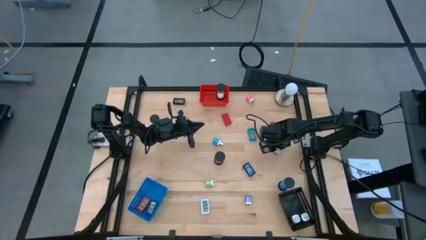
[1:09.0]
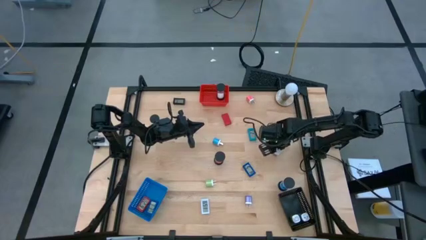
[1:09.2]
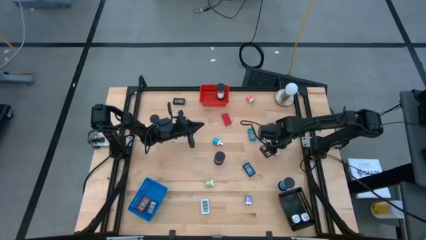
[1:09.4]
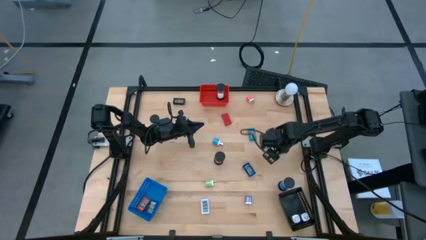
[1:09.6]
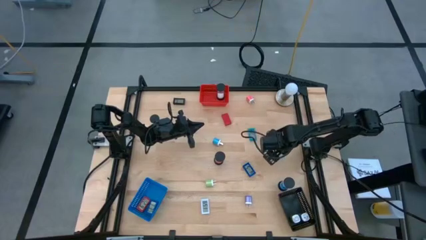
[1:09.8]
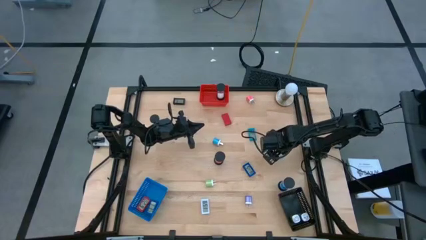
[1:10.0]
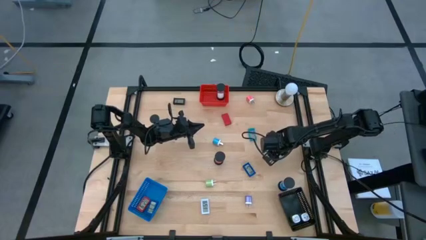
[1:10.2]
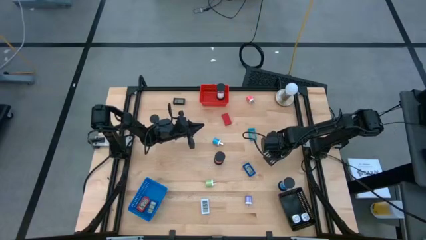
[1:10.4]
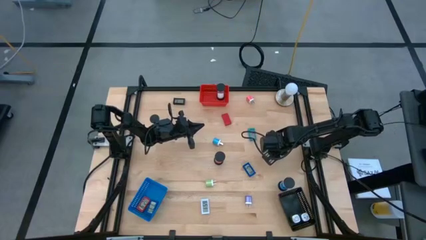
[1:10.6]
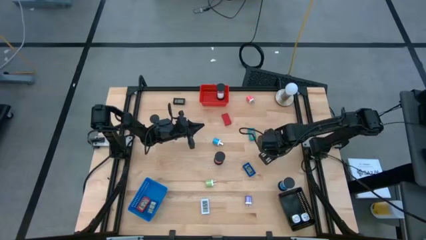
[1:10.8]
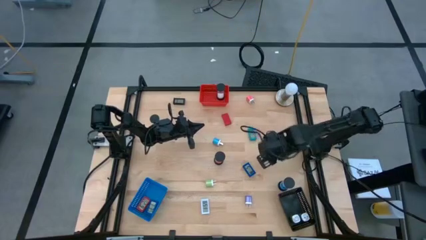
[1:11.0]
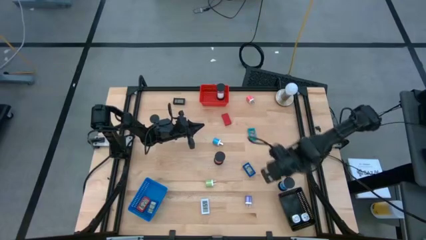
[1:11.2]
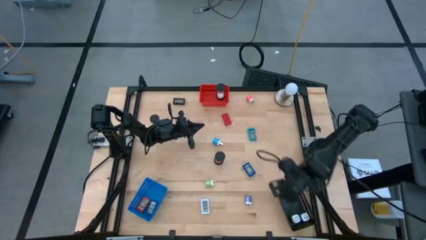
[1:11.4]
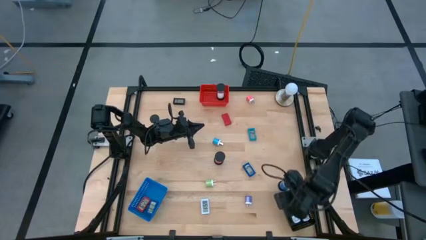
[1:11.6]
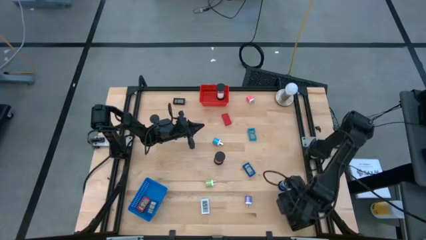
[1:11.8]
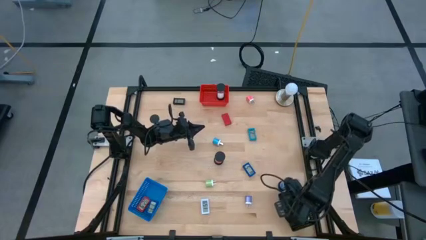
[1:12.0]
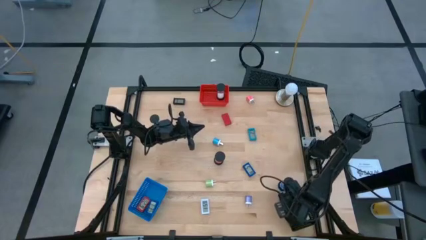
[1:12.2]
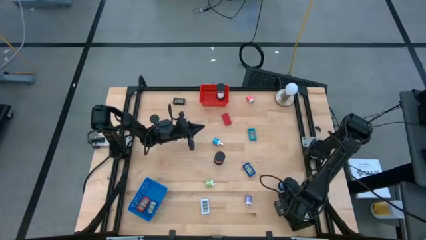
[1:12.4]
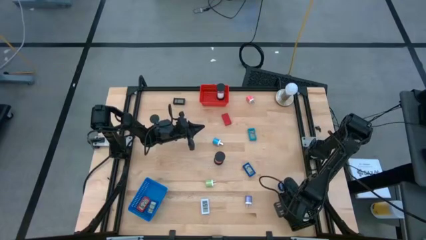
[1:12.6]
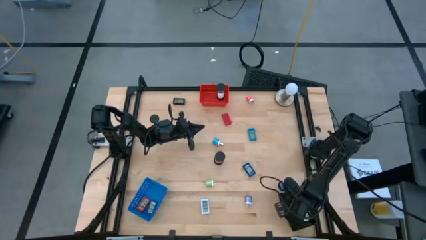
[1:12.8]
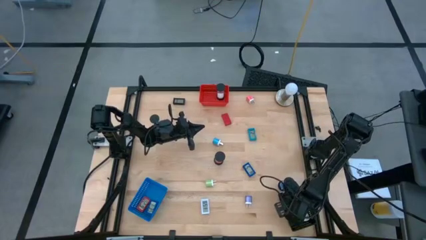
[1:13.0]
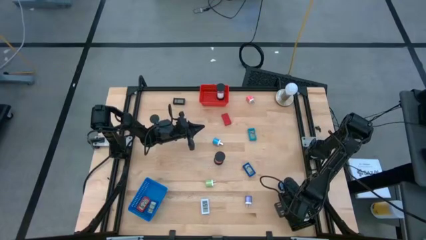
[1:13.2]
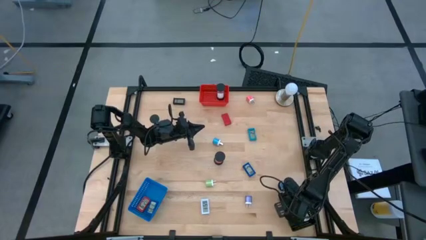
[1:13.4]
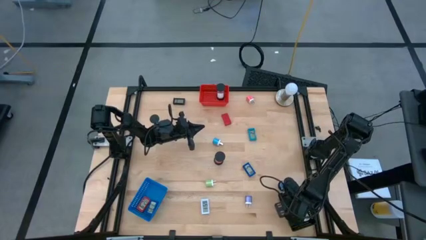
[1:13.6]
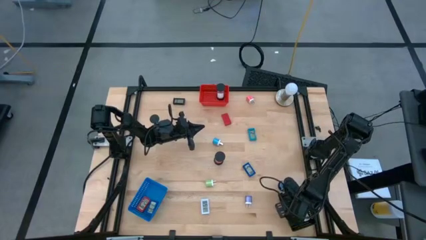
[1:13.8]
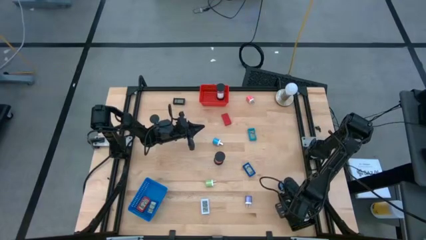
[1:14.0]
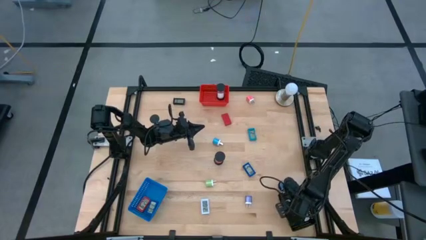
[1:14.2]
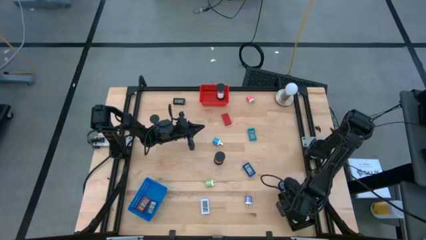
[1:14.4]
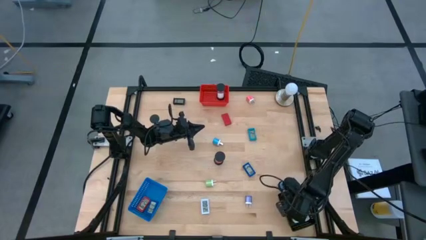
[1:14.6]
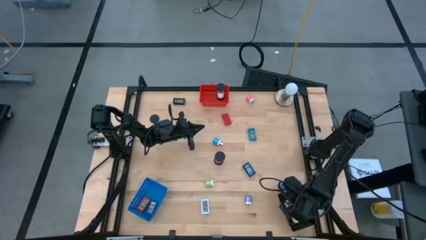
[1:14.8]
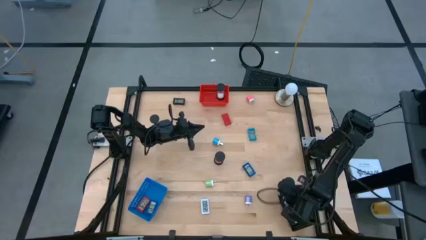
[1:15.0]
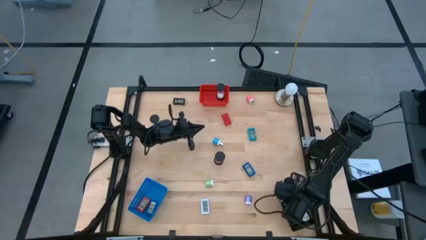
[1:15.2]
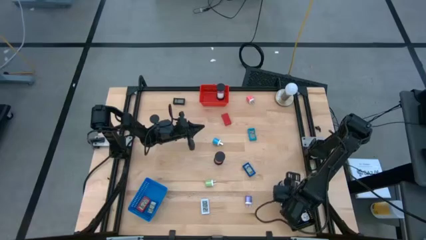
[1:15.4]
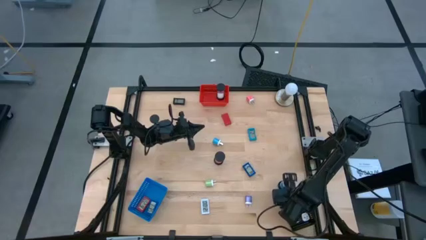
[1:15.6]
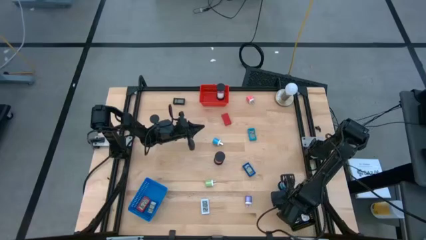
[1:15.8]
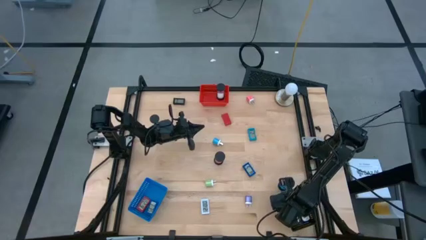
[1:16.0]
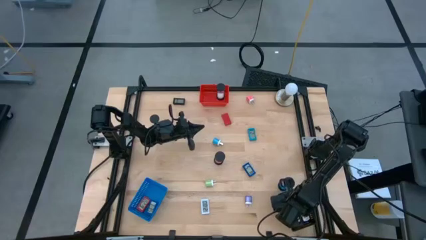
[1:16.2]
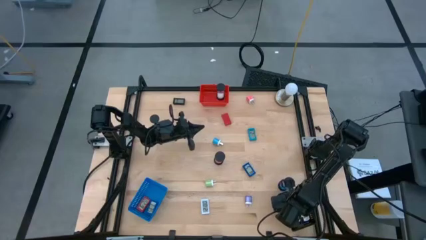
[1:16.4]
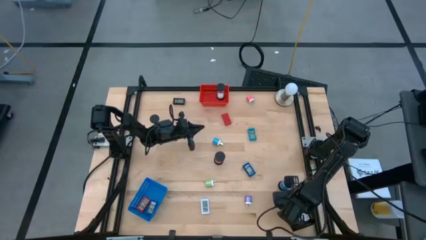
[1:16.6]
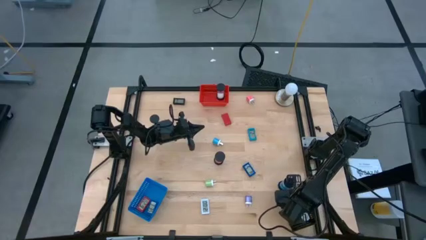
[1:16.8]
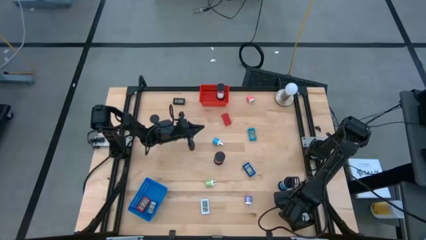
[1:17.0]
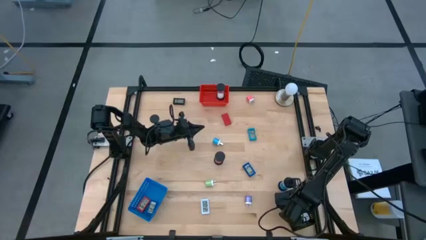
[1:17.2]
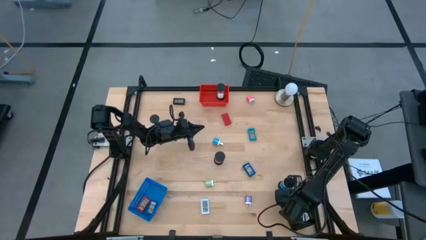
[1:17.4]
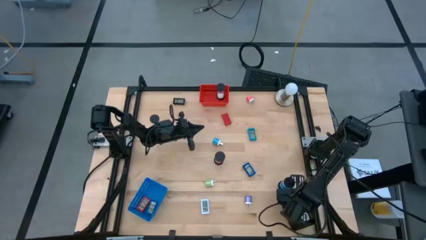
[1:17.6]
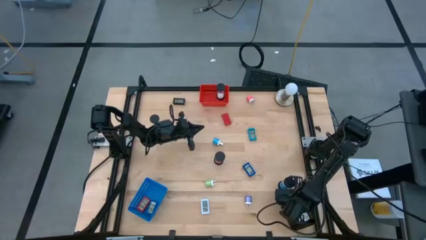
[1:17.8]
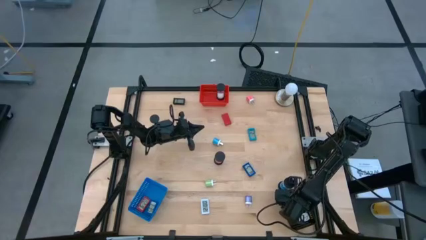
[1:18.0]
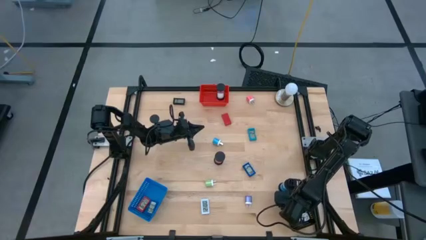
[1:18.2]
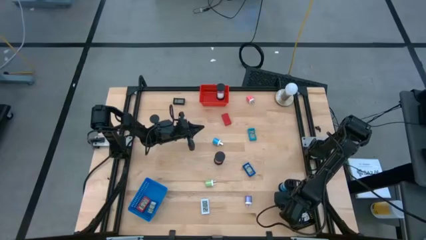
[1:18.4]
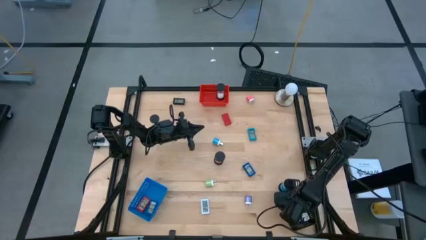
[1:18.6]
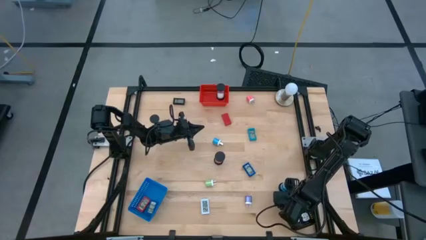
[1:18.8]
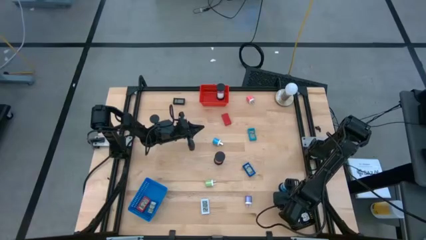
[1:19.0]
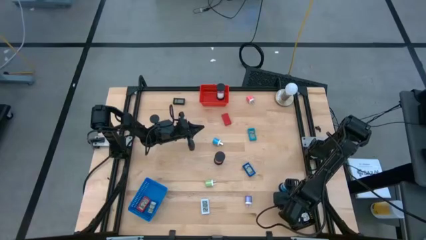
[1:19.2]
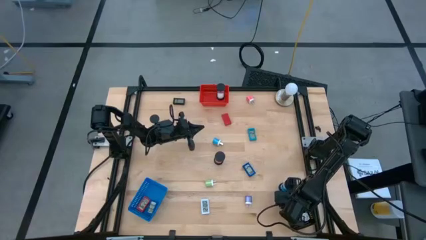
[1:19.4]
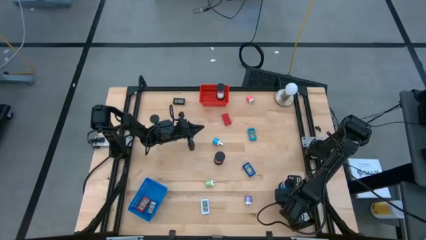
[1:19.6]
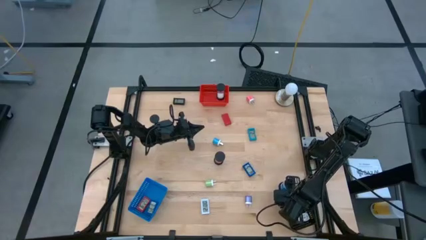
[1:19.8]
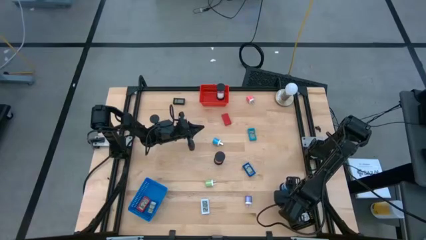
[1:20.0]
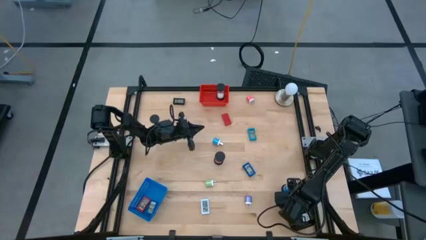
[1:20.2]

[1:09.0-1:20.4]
Task: Pick & Place Office items
Put the top dark blue charger adapter into the black bin

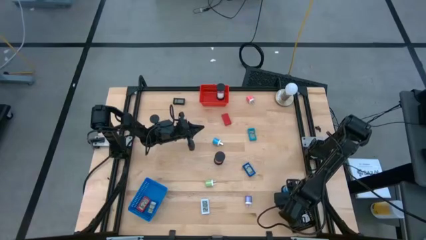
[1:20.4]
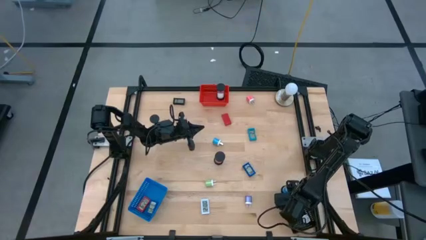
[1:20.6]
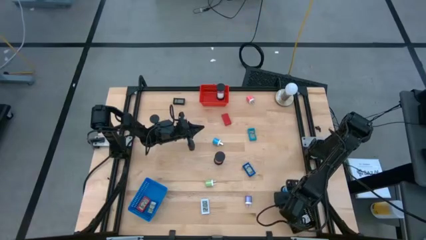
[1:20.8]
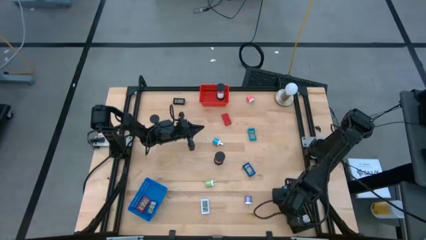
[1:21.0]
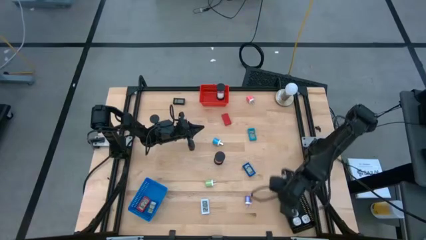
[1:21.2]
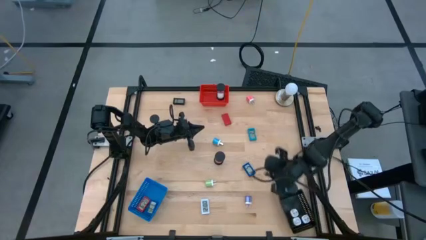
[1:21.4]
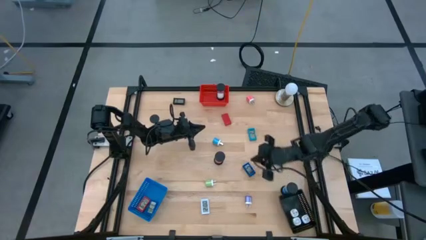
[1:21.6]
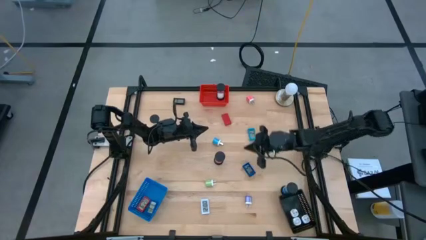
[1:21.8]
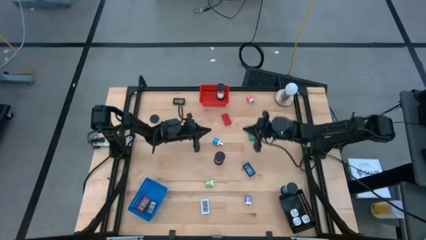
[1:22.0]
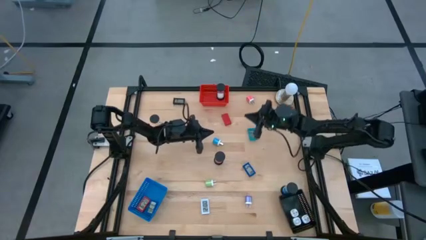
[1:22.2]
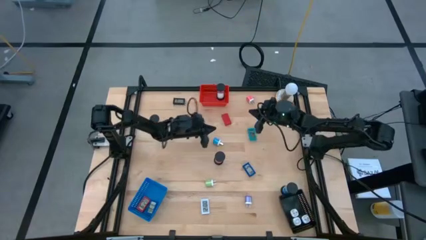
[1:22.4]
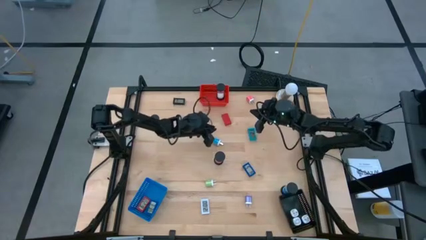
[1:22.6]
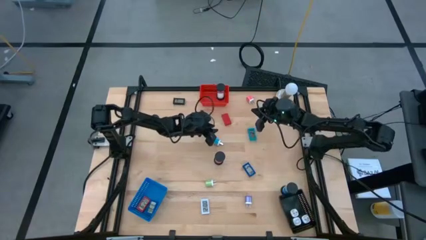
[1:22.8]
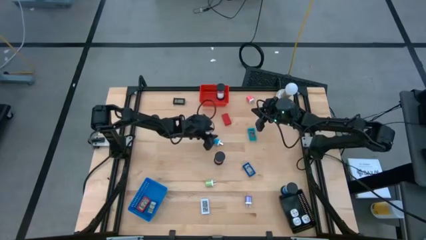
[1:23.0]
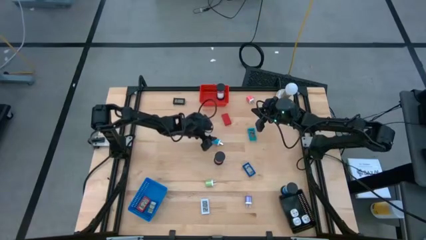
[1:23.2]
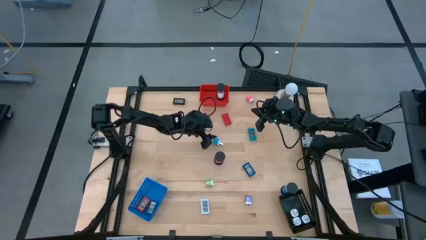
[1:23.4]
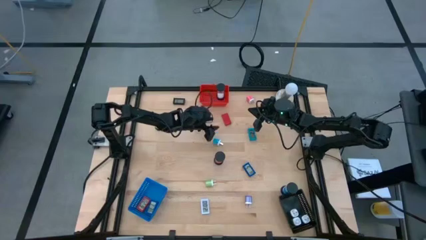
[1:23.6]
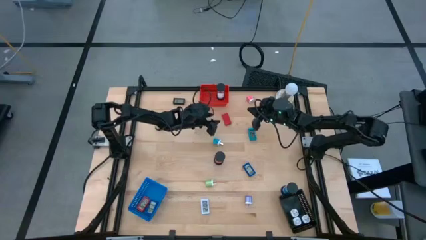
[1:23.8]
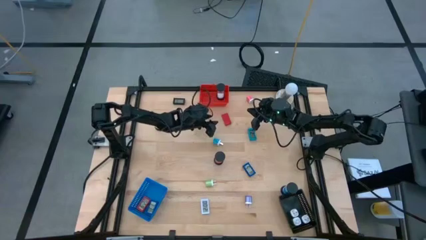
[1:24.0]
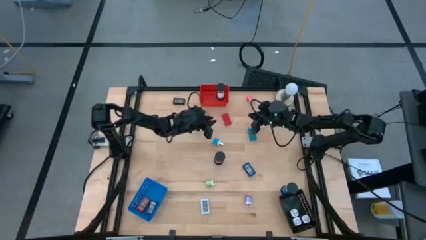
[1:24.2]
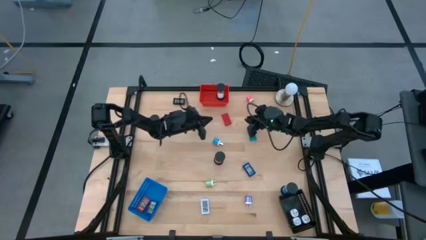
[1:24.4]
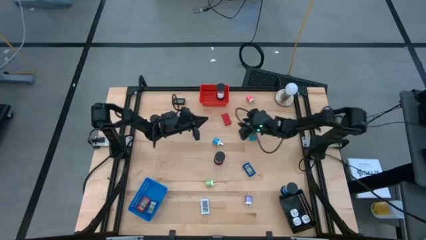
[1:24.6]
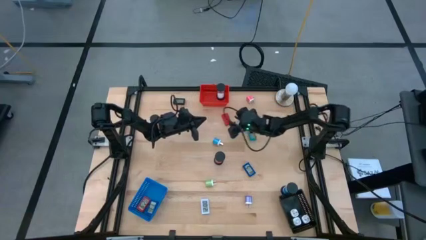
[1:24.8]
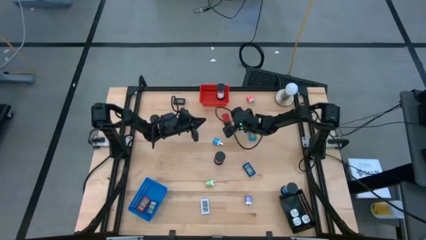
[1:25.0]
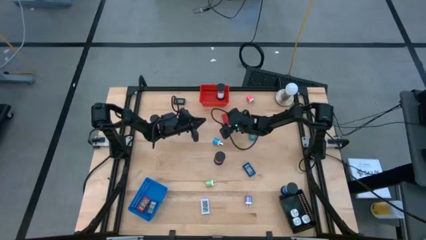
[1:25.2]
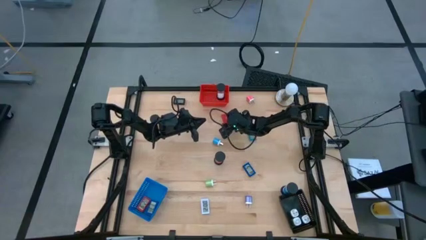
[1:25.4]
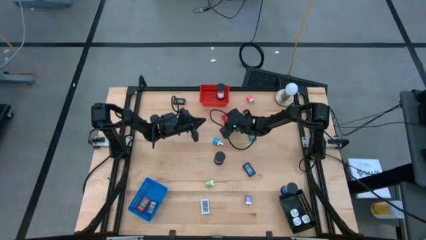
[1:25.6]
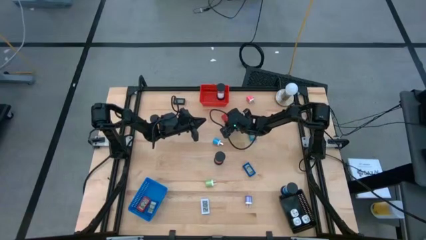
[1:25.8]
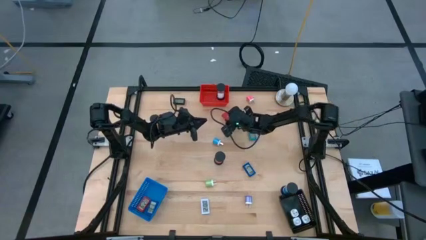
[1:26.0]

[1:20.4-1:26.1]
Put the red digital timer into the blue bin
